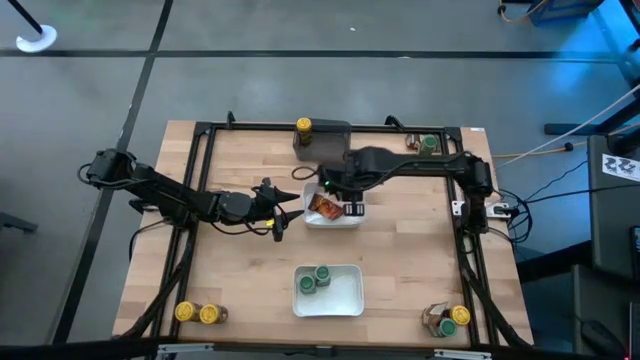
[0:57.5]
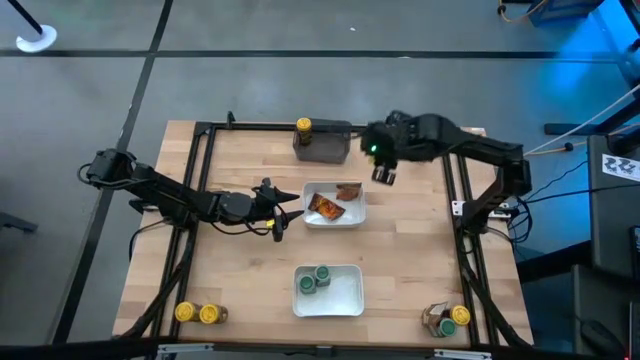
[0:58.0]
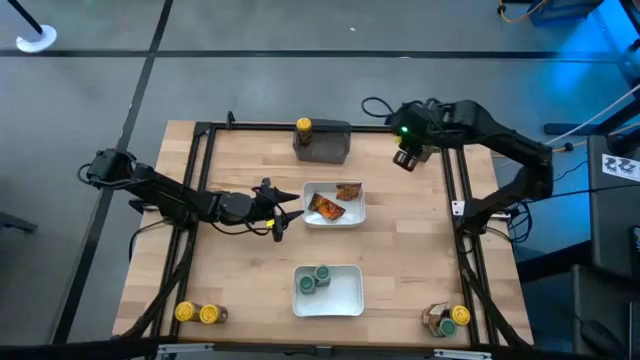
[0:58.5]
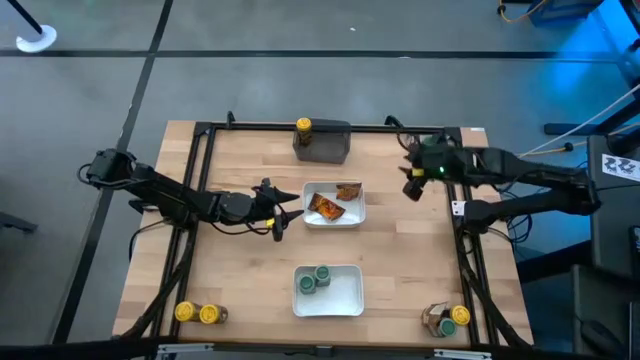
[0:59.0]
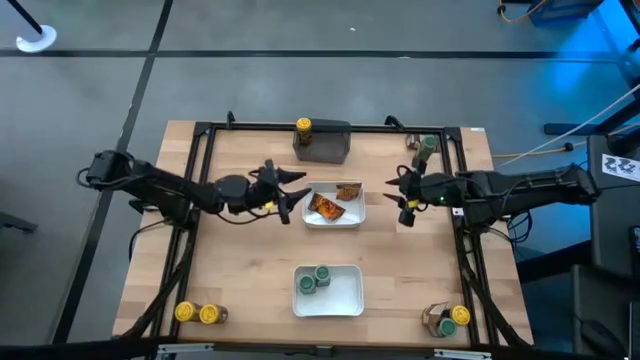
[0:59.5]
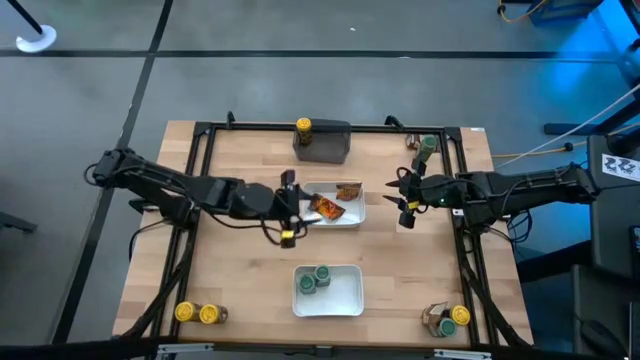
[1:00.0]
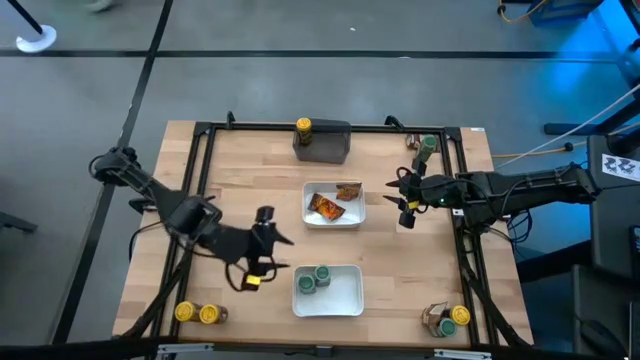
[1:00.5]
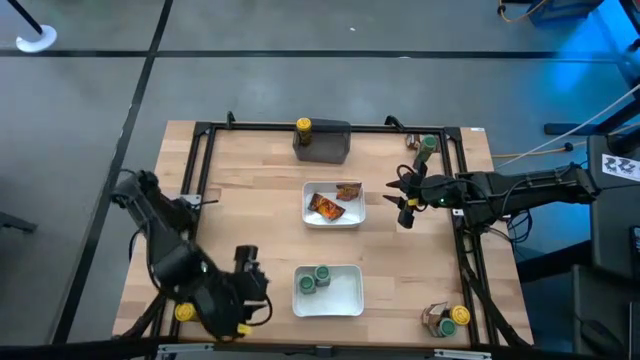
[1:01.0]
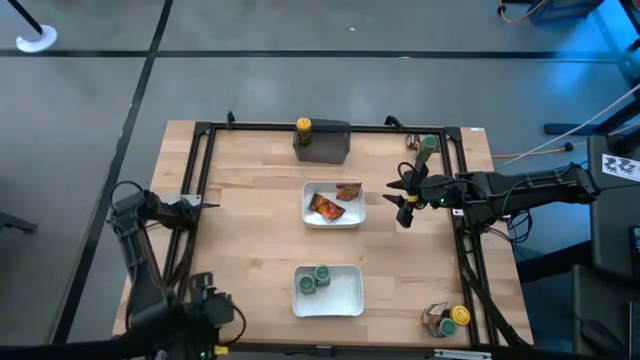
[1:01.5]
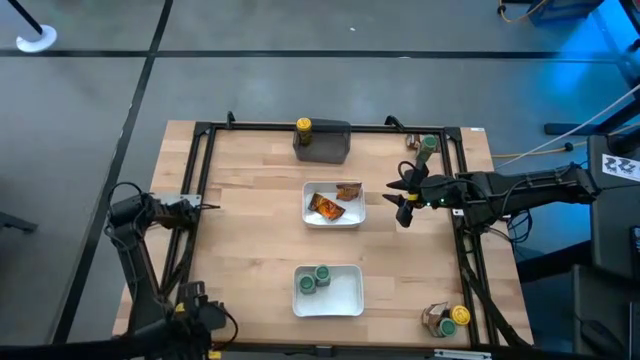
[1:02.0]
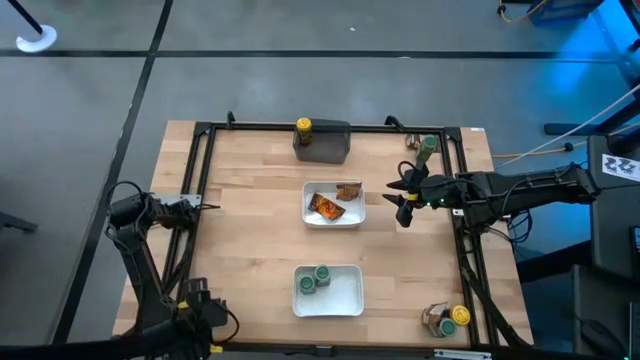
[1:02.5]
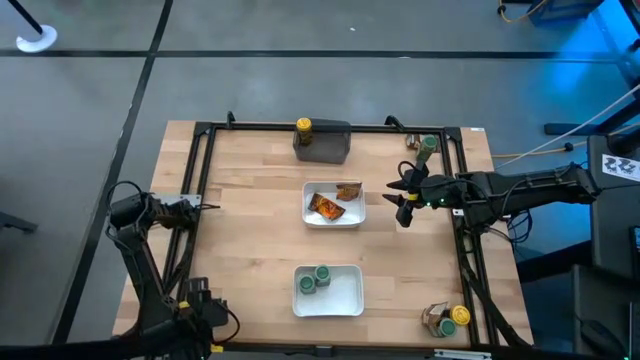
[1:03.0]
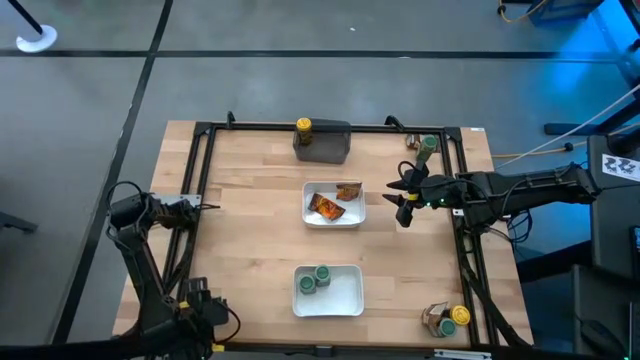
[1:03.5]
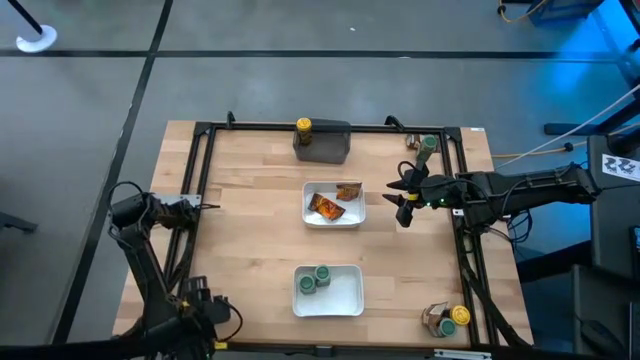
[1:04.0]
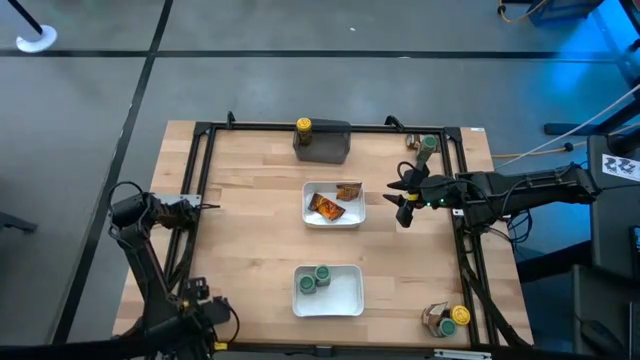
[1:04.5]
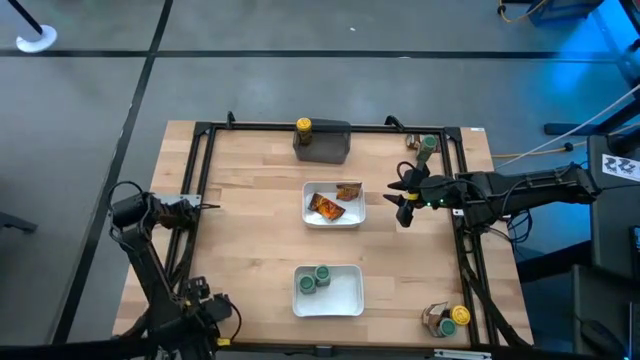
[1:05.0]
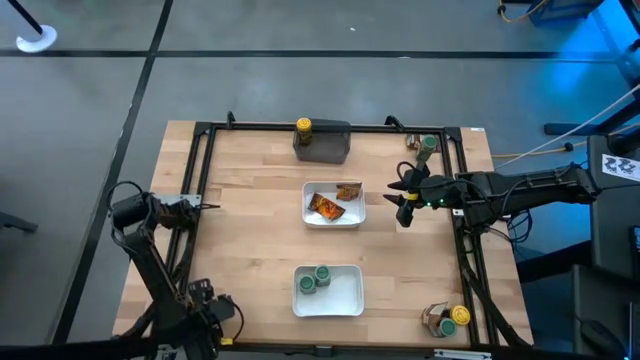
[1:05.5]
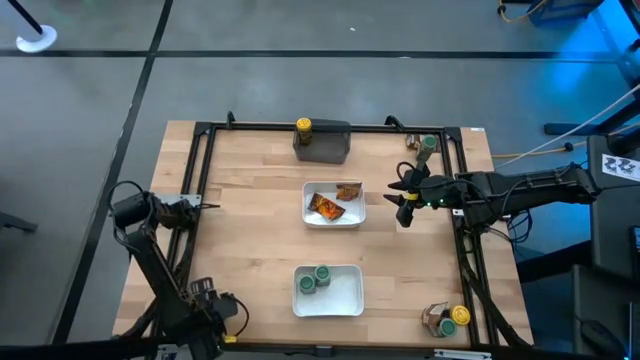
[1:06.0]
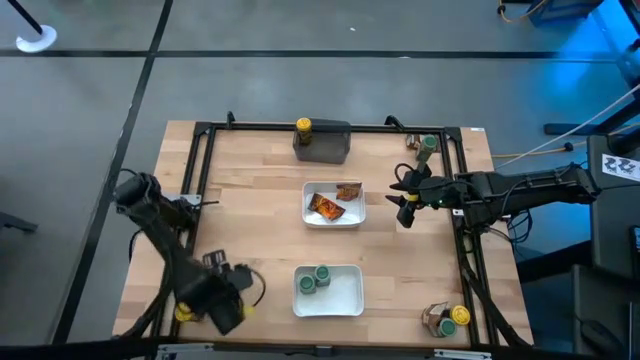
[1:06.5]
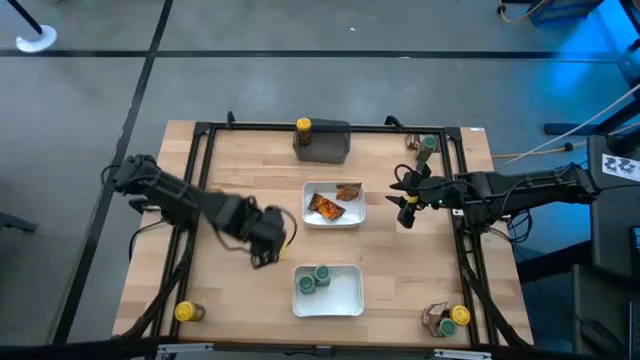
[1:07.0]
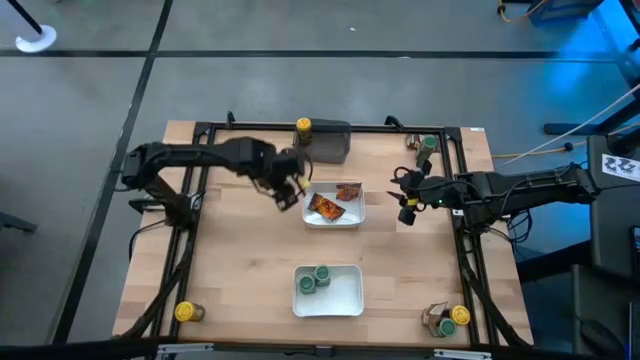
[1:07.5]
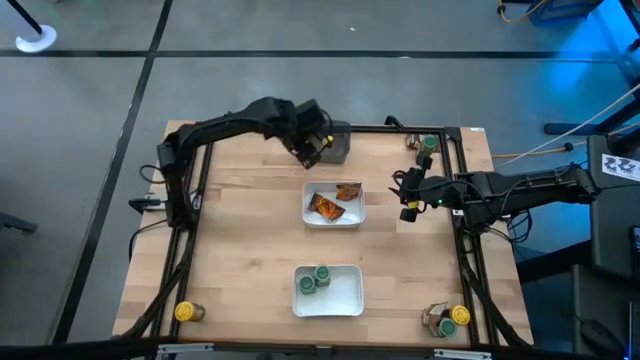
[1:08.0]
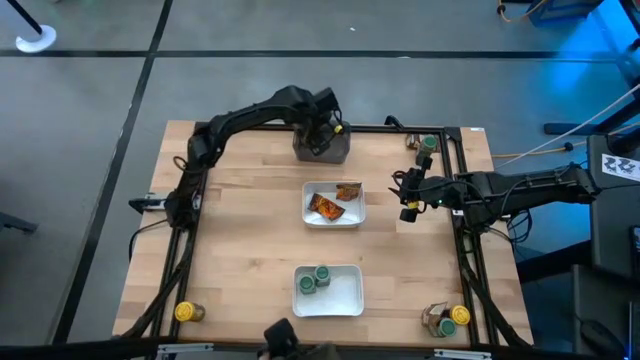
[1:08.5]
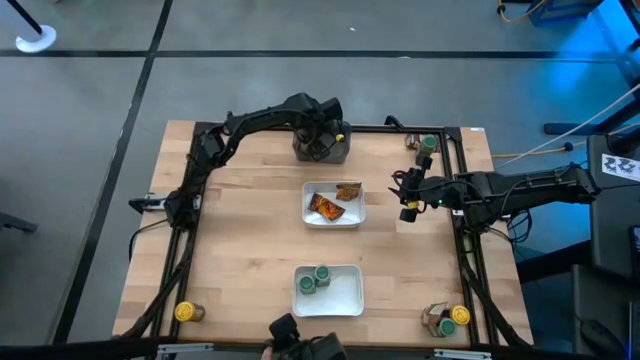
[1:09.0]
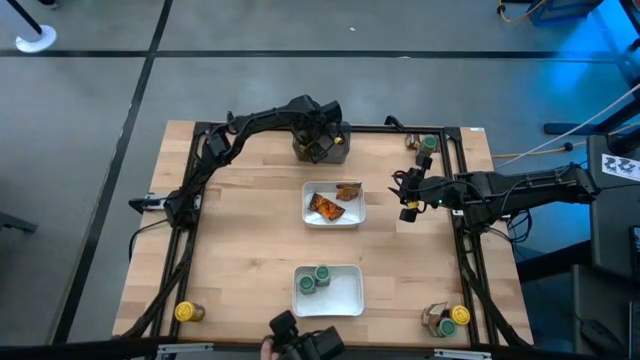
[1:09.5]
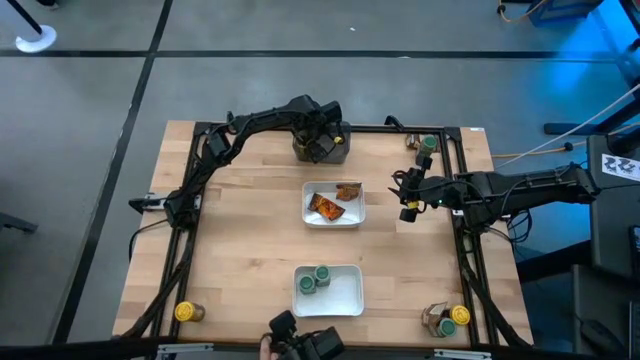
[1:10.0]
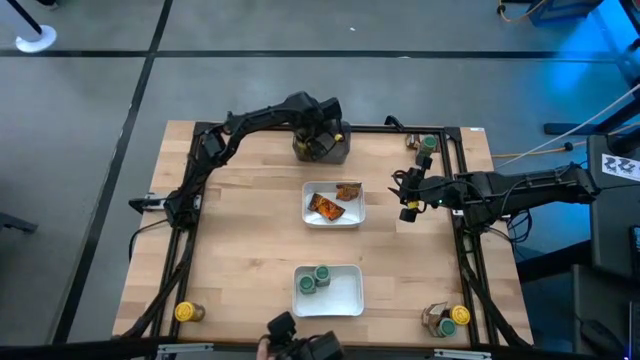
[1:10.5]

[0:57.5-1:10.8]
Task: Sort spices by type
Put the yellow seasoning bottle into the black bin

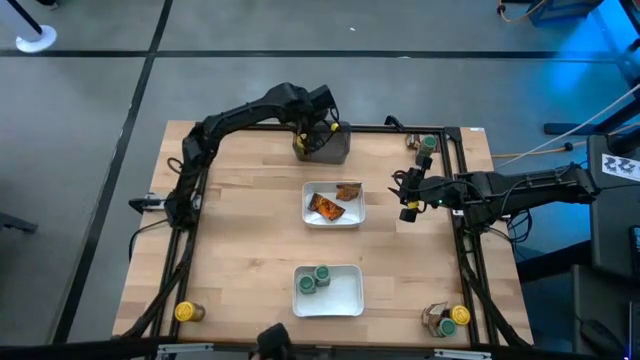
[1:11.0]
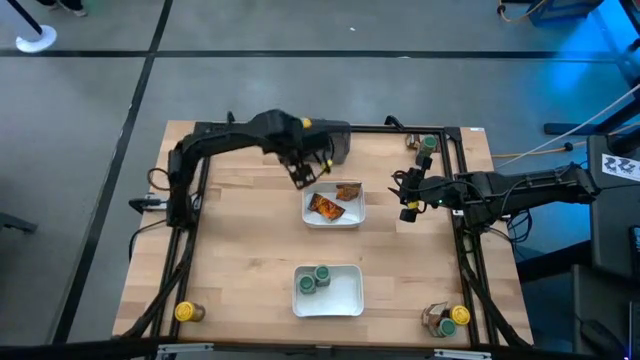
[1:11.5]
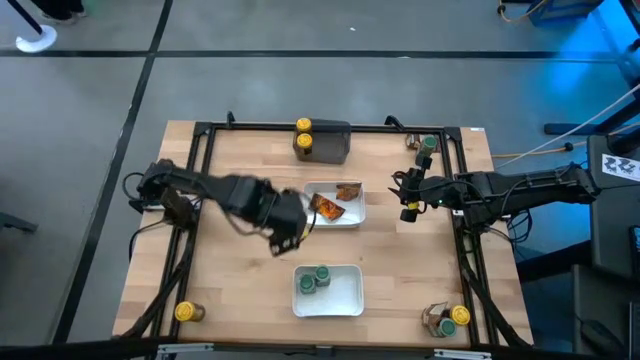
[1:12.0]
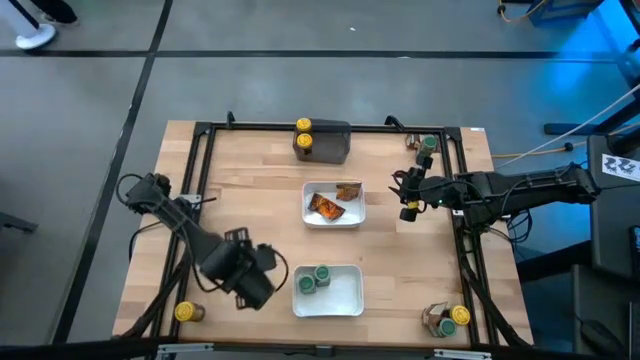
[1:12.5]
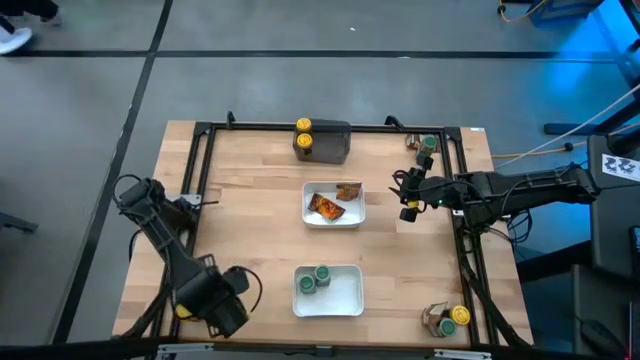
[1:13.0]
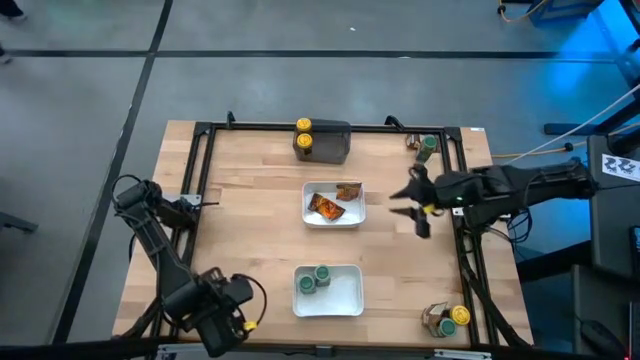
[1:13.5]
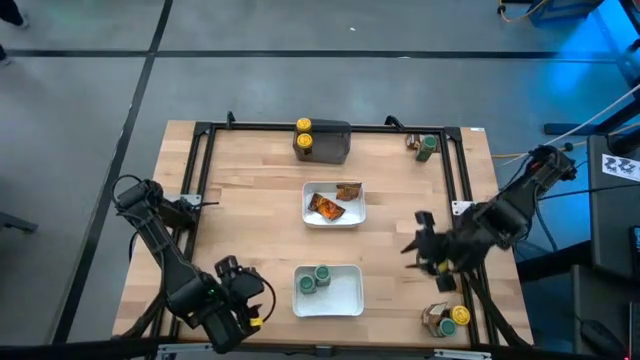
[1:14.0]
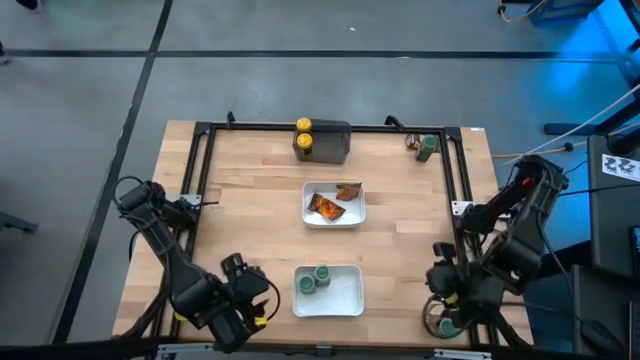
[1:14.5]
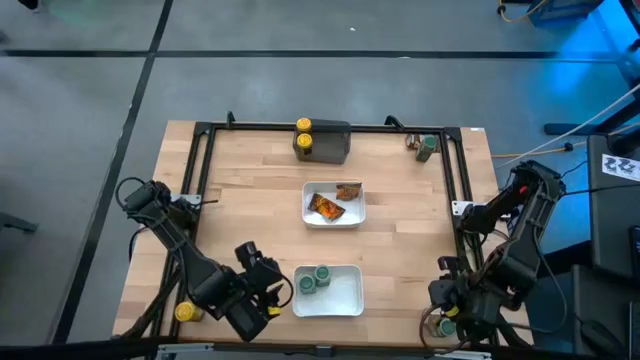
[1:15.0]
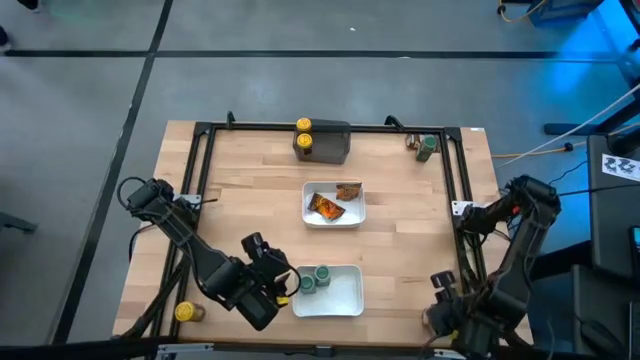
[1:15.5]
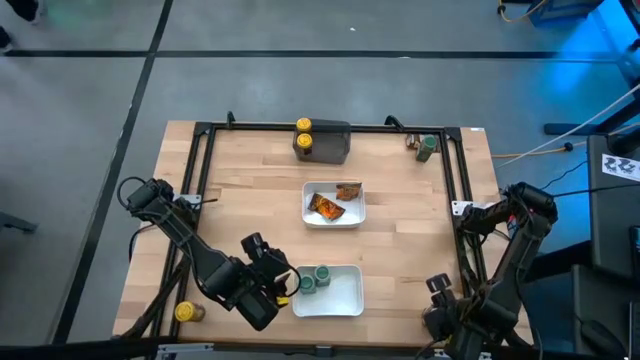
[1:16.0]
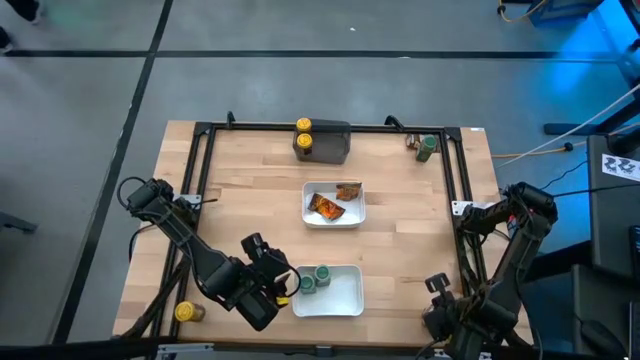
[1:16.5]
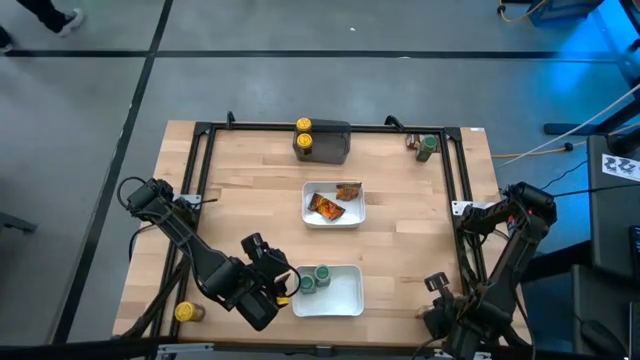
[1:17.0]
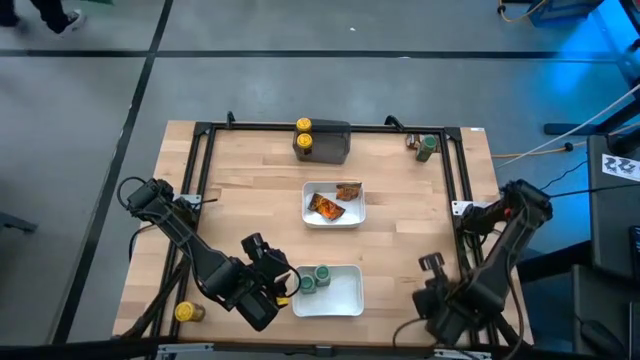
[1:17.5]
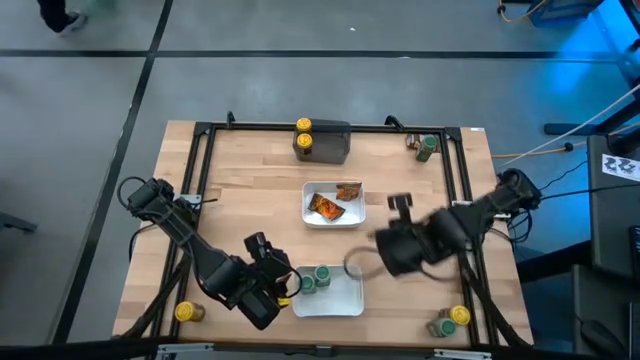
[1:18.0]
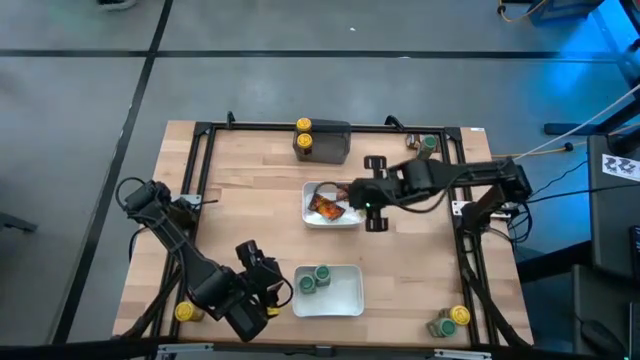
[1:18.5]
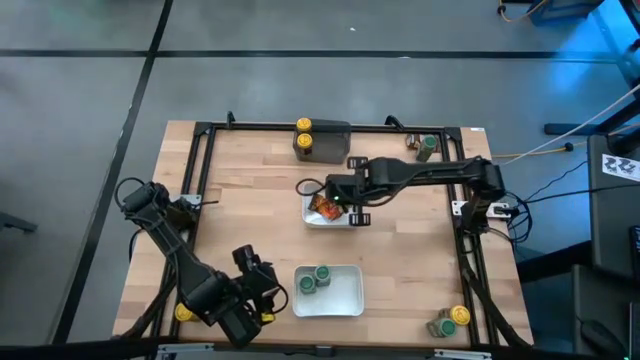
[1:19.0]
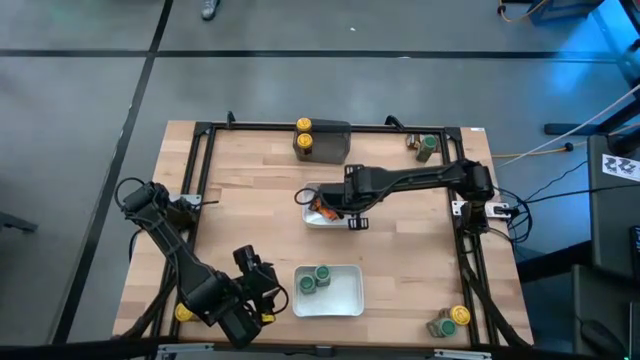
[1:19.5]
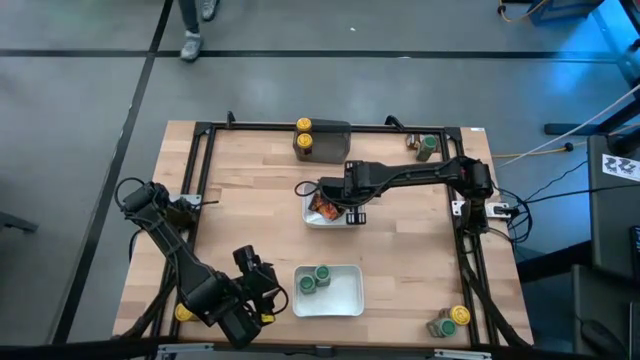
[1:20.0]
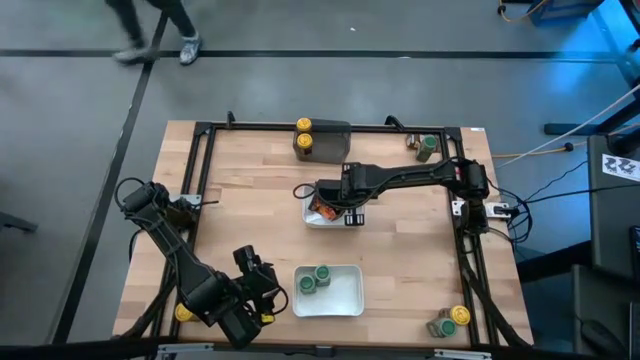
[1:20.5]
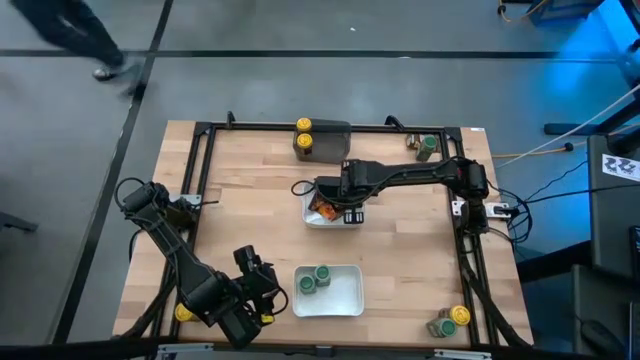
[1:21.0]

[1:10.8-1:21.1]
Put the orange seasoning bag into the top white bin
